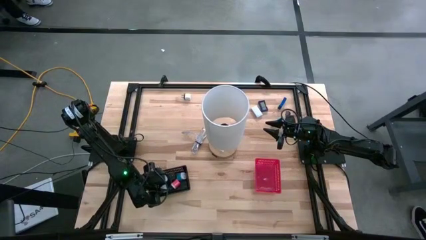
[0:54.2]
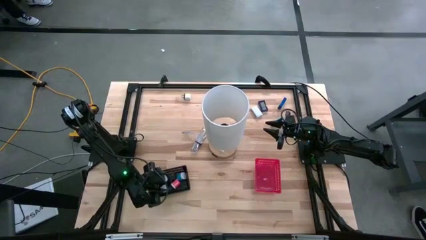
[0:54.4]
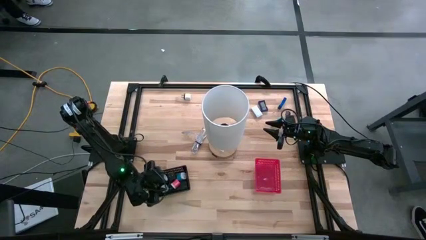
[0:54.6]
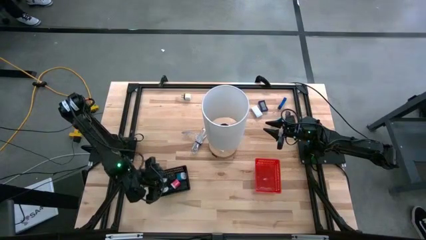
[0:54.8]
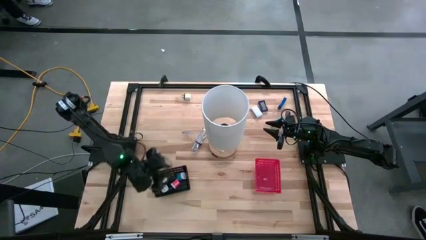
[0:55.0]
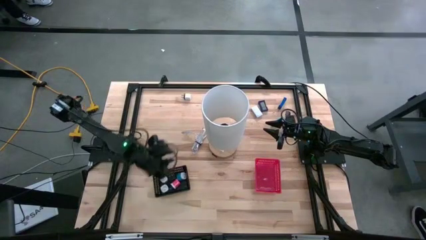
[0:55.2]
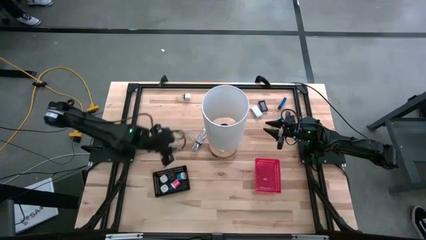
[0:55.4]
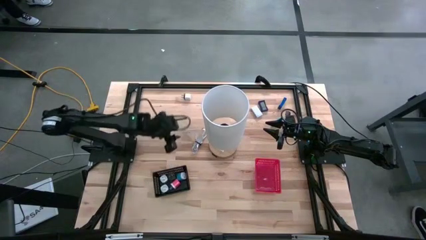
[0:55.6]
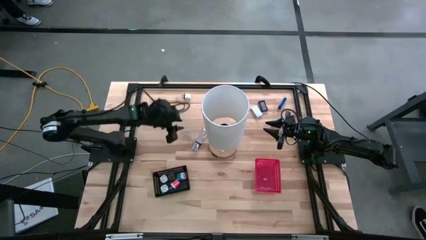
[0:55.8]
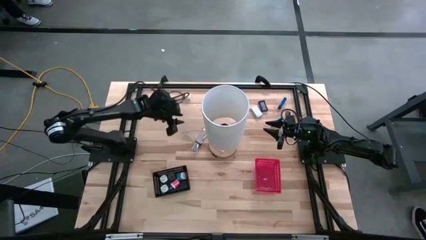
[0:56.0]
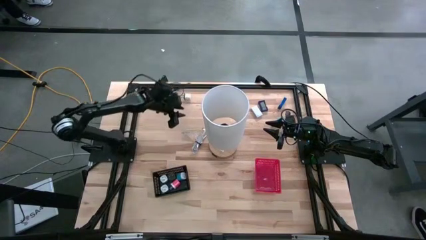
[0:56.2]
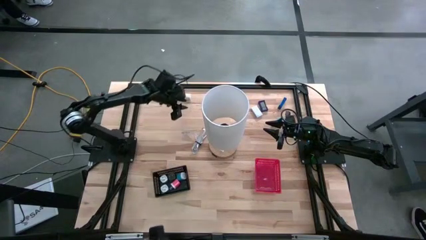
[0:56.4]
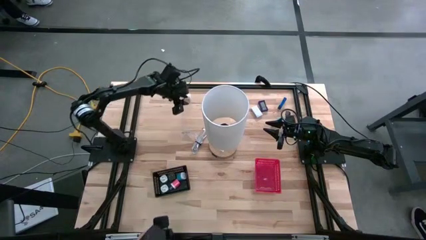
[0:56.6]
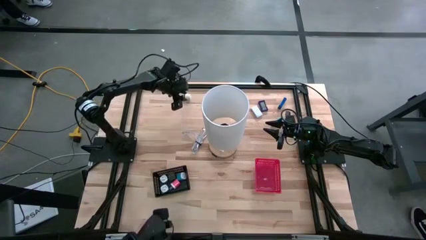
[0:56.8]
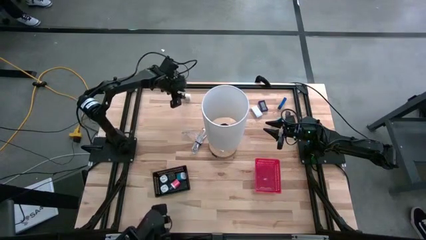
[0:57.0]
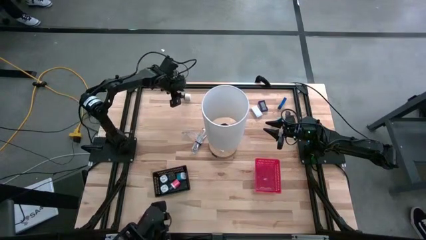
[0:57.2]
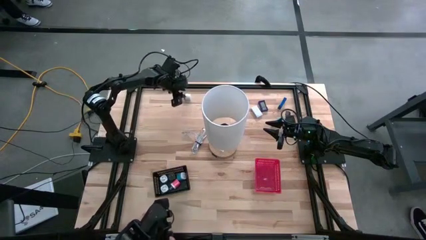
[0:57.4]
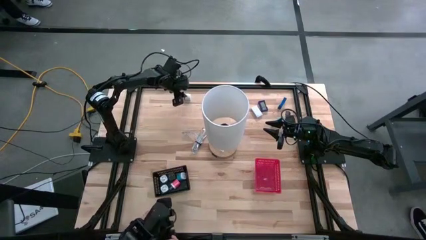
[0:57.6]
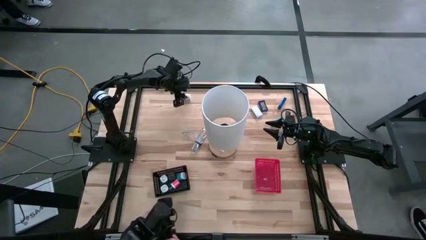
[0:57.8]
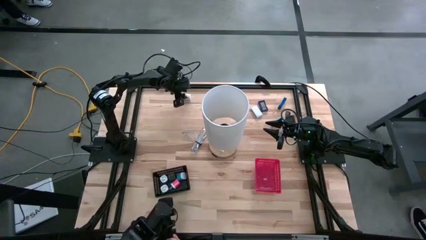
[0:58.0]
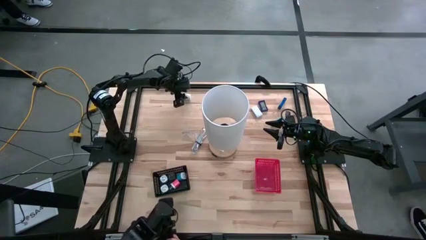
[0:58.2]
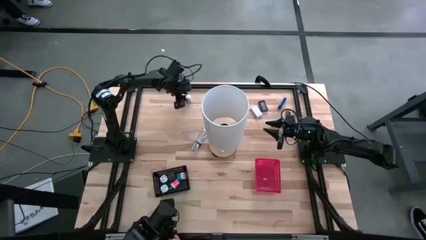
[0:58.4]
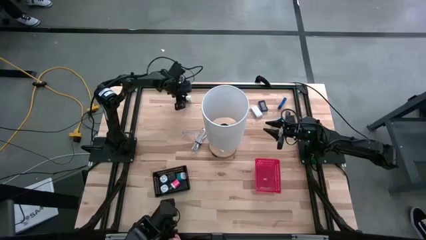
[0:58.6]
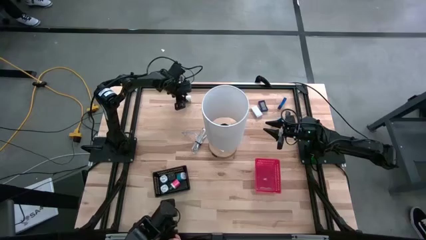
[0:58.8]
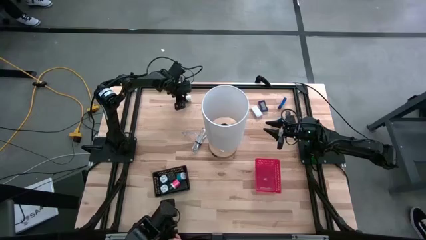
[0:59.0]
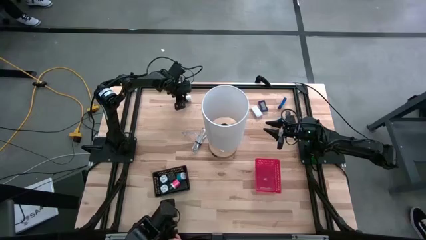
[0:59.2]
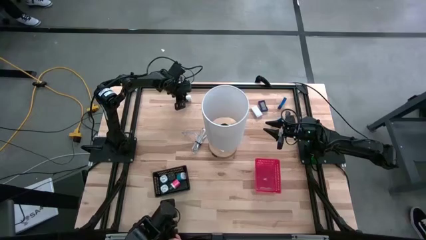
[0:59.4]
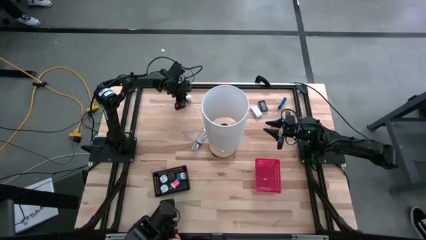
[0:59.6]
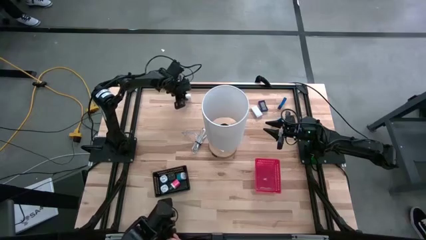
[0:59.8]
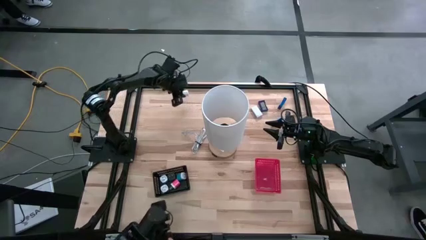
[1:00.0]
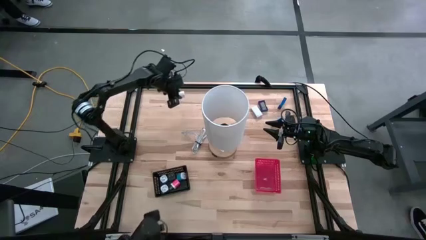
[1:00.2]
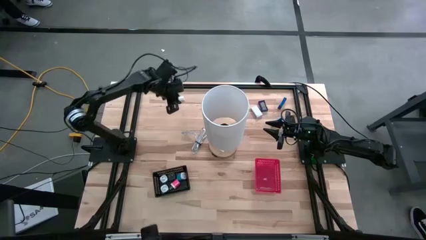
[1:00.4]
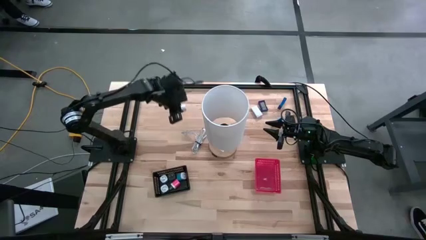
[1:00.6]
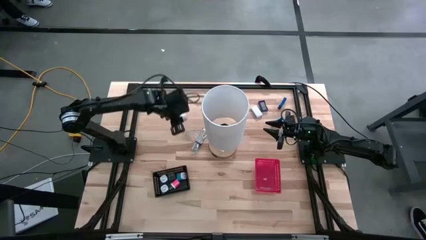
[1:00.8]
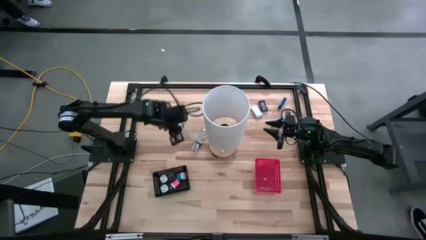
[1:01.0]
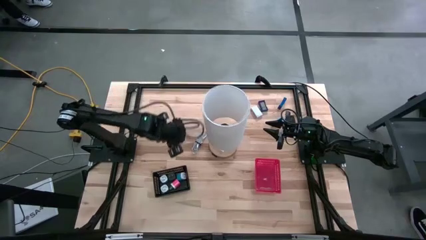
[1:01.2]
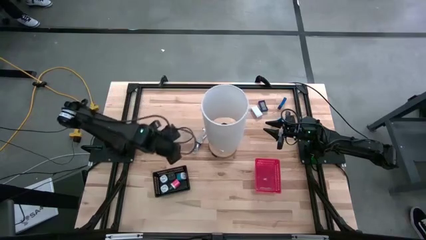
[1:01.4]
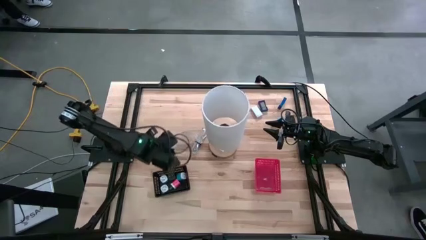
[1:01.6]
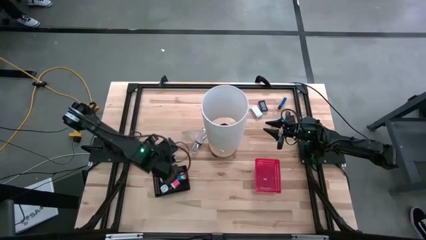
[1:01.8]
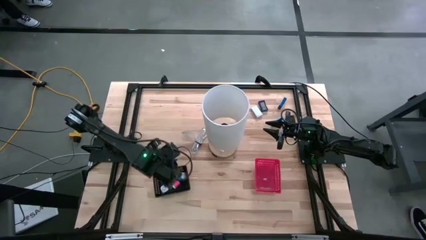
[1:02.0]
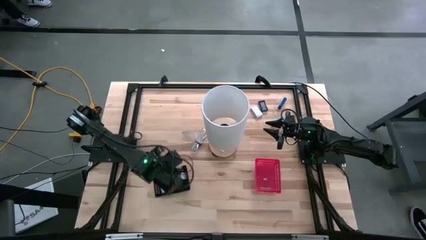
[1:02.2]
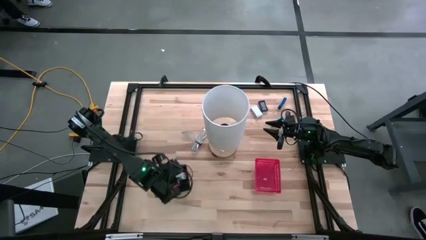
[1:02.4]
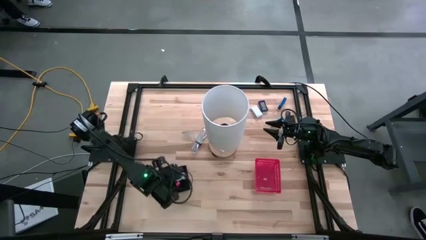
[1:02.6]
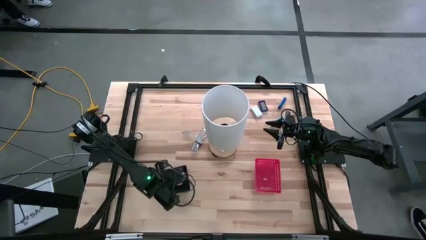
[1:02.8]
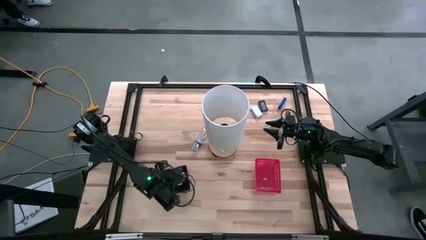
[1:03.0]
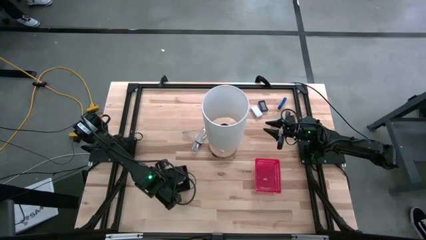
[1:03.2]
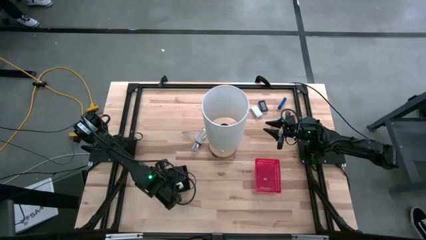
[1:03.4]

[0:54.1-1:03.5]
Task: Pick & Place Office items
Put the white charger adapter into the black bin

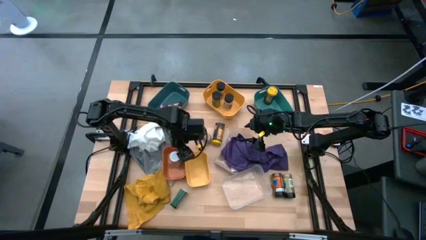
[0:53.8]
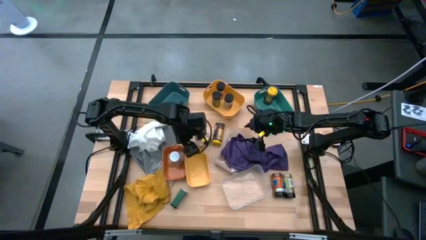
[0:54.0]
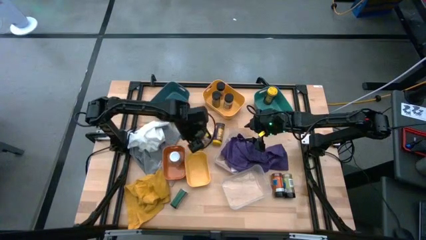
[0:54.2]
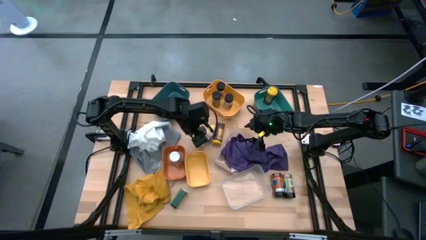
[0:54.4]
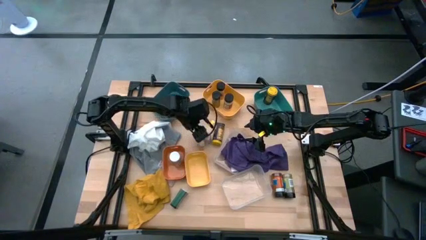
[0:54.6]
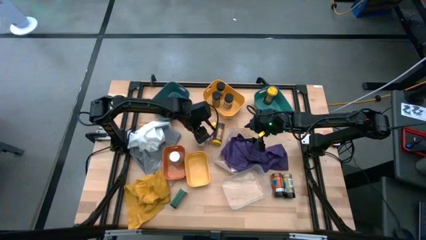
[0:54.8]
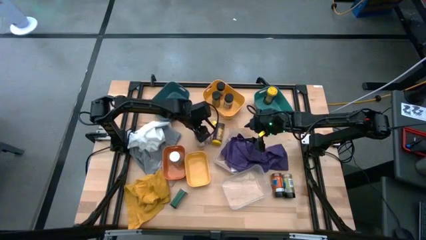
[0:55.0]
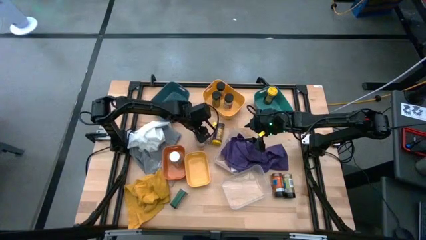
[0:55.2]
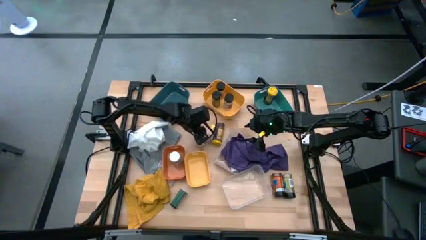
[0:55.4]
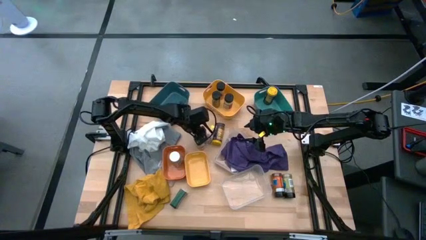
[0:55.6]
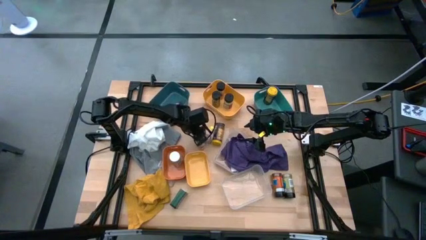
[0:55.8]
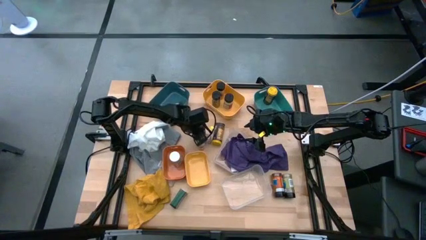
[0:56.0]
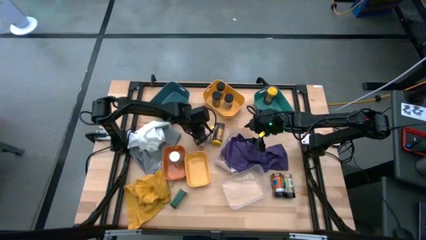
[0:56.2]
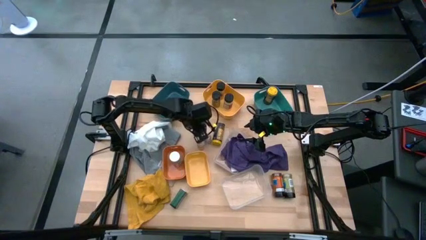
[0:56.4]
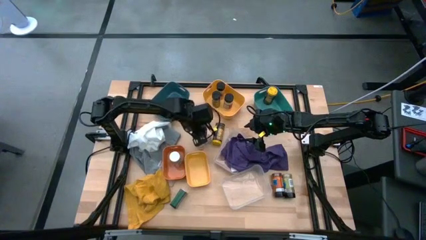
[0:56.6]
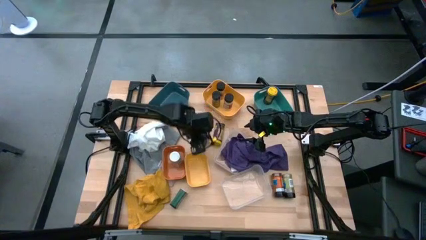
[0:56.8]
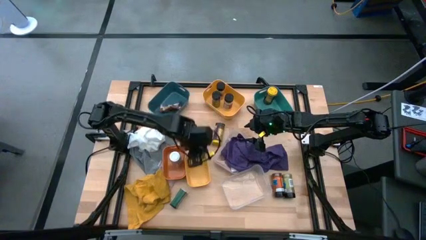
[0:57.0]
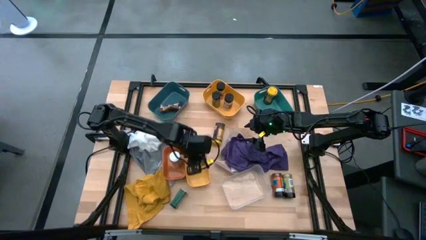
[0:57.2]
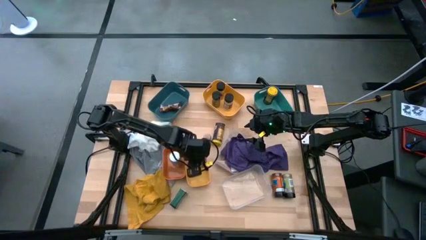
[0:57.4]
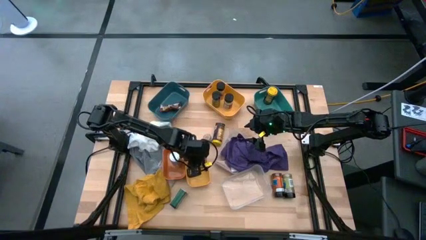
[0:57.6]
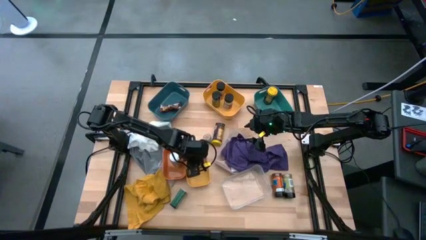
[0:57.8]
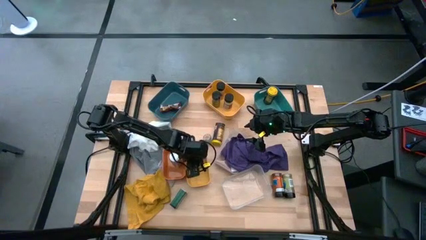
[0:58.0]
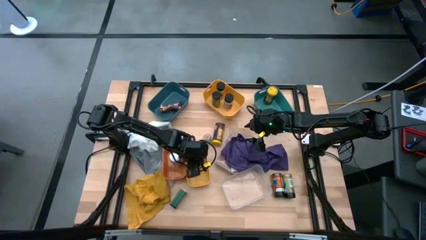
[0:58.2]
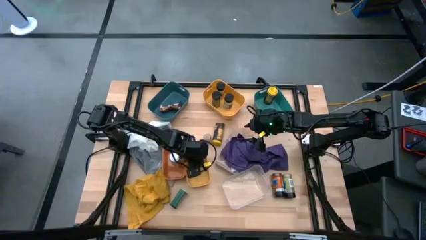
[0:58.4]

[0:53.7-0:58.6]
Task: Sort spices by type
Put the black spice can into the small yellow bin
